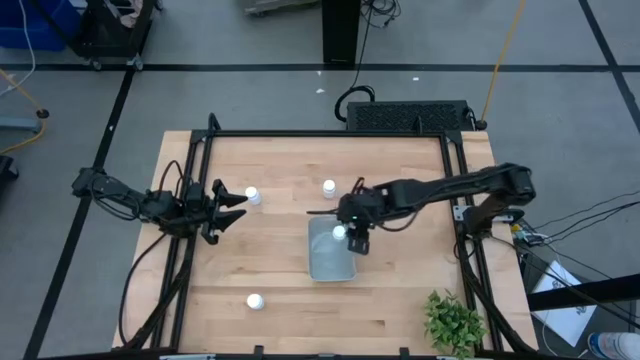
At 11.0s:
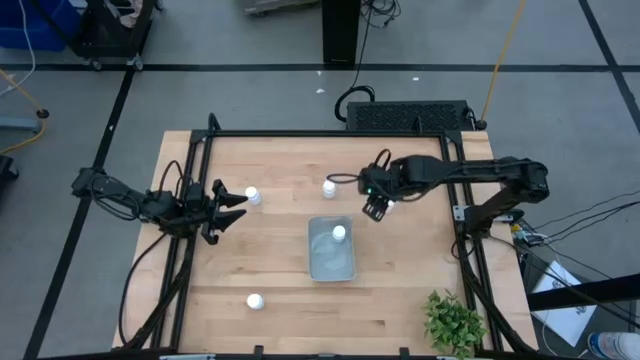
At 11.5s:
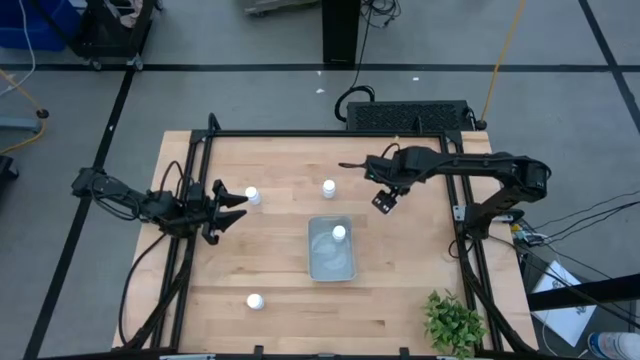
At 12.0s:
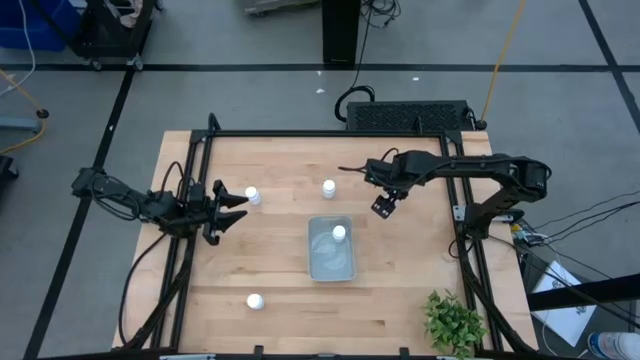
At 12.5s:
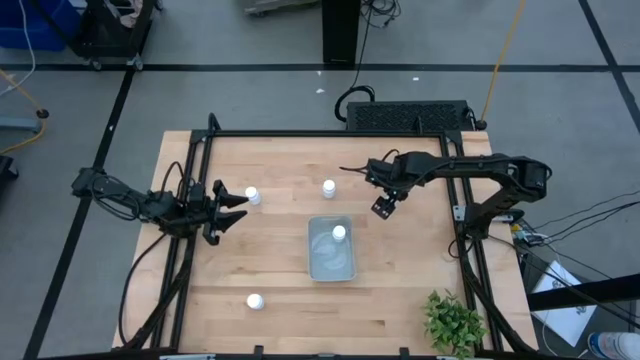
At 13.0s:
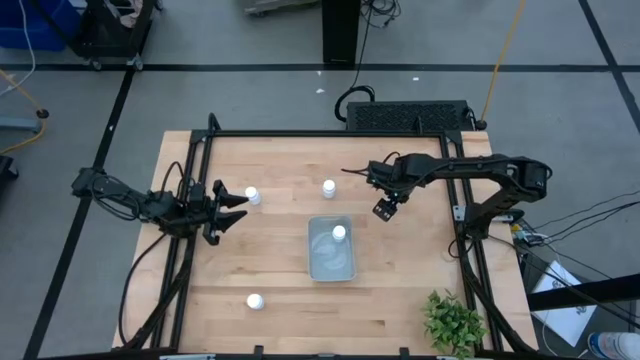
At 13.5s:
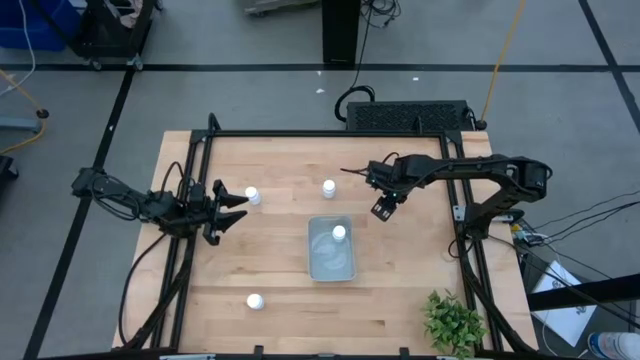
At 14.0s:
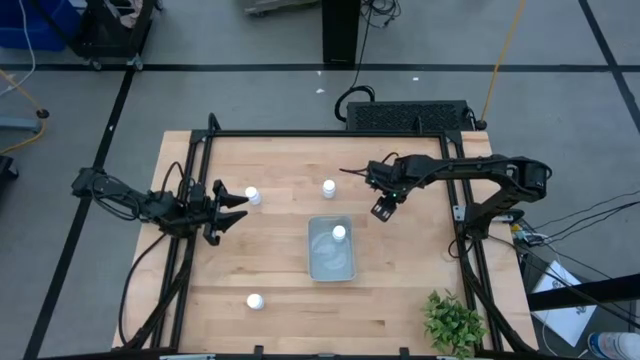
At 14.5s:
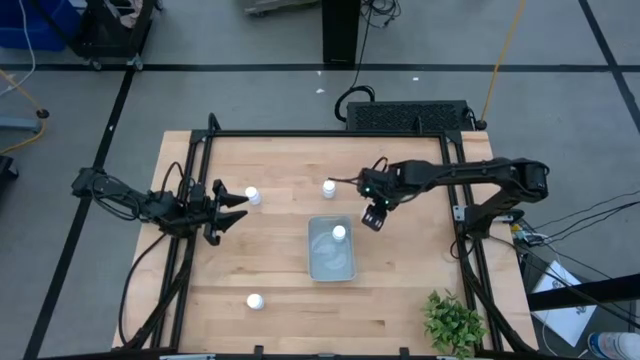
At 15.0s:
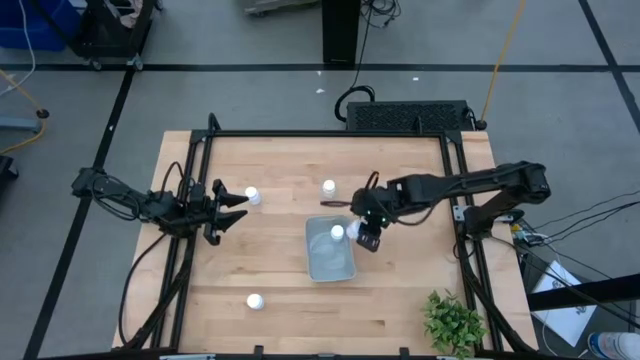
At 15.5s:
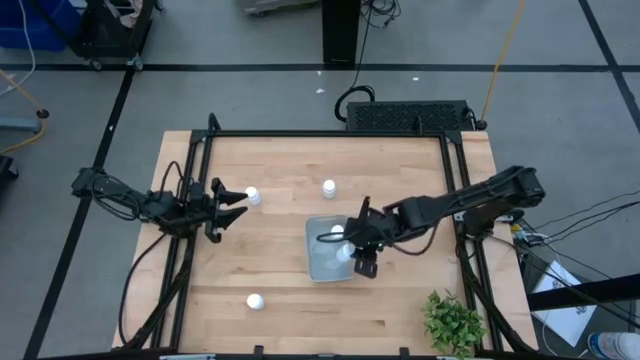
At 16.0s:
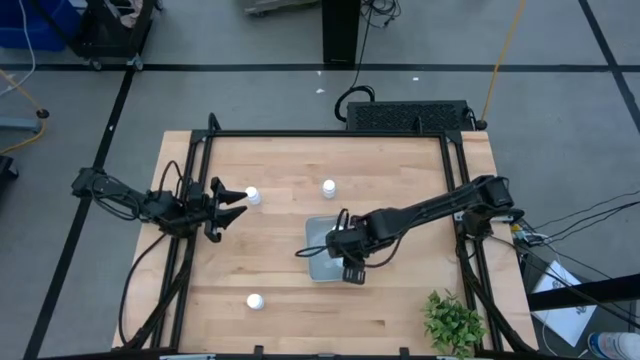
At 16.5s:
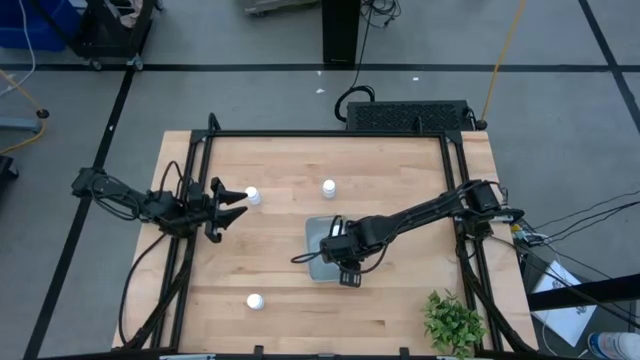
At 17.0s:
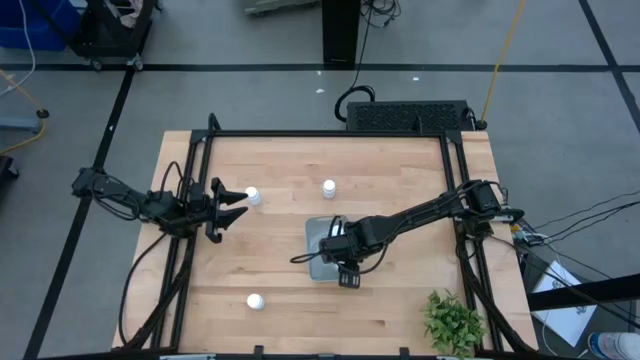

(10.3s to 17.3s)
Task: Pick and place pill bottles into a basket
Put the white medicine bottle into the gray bin

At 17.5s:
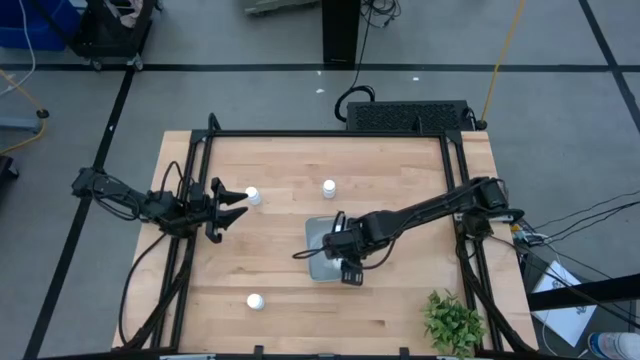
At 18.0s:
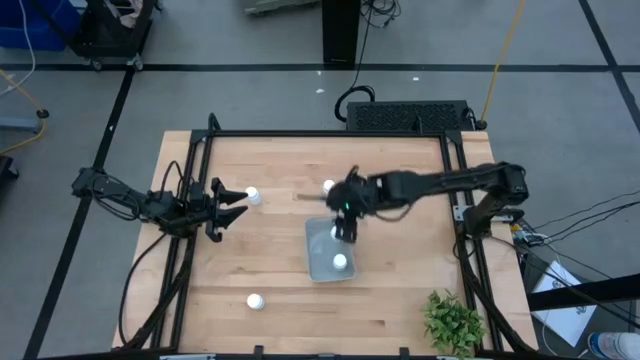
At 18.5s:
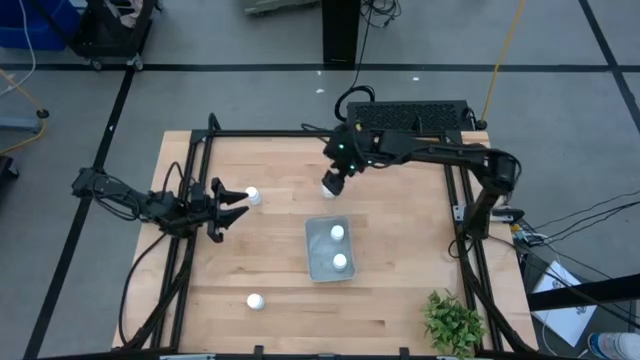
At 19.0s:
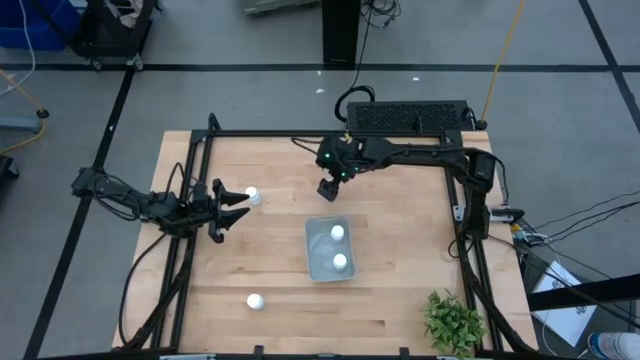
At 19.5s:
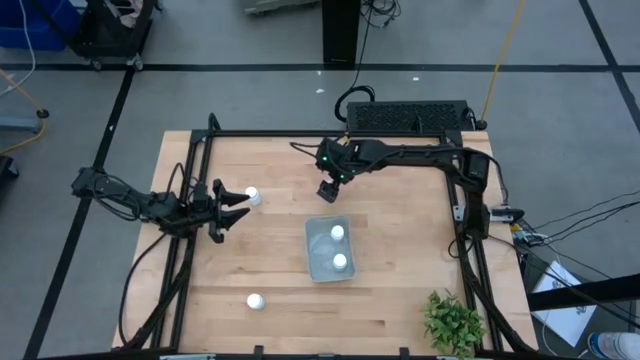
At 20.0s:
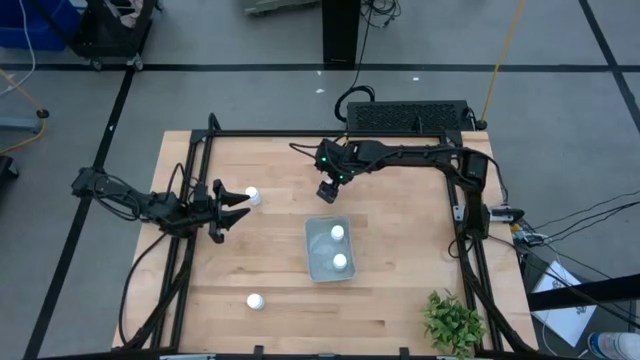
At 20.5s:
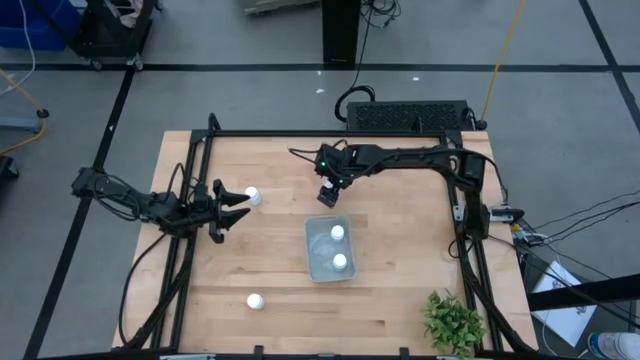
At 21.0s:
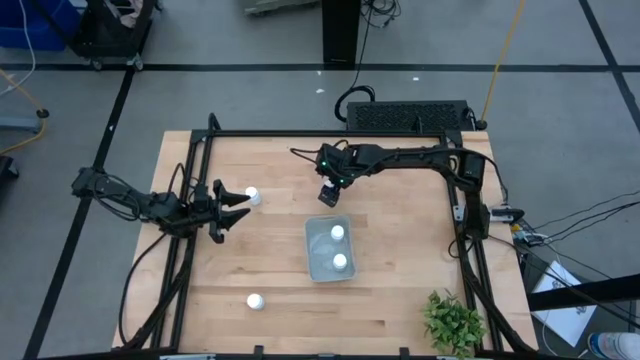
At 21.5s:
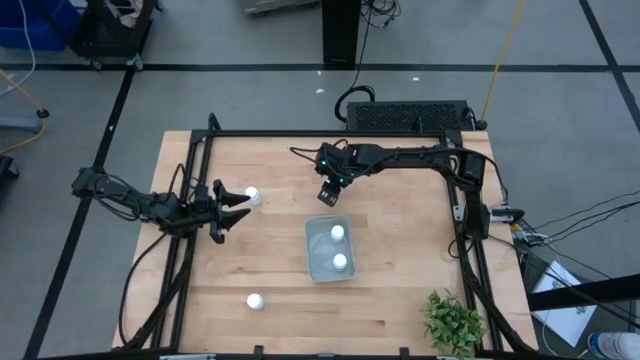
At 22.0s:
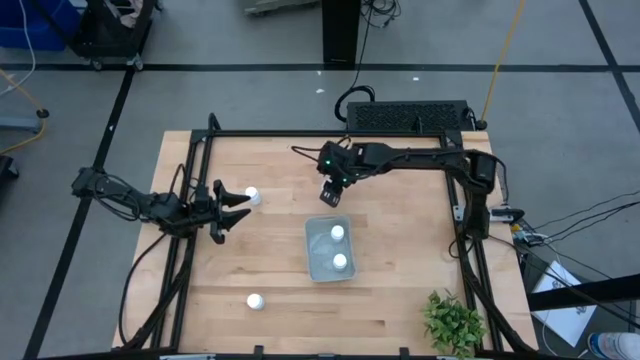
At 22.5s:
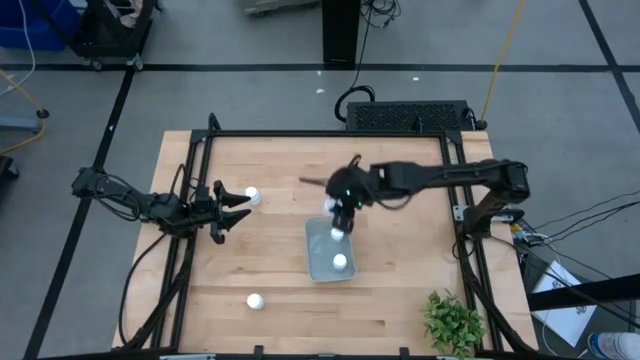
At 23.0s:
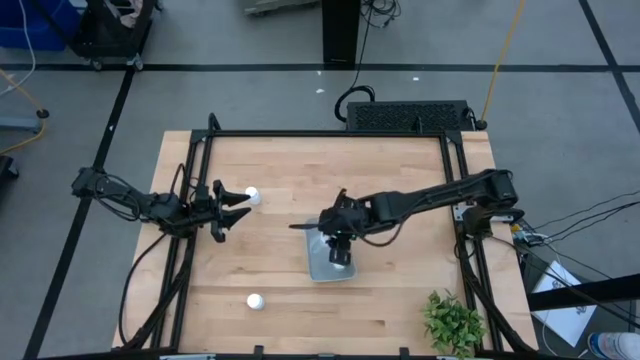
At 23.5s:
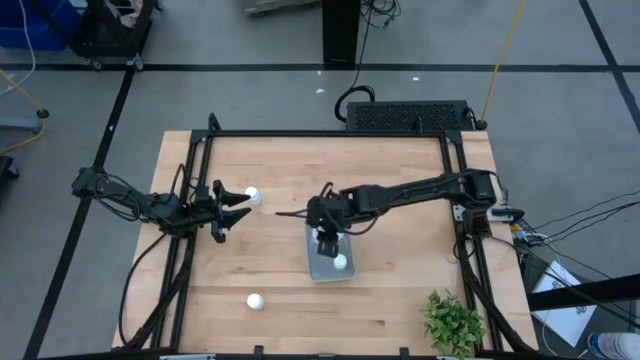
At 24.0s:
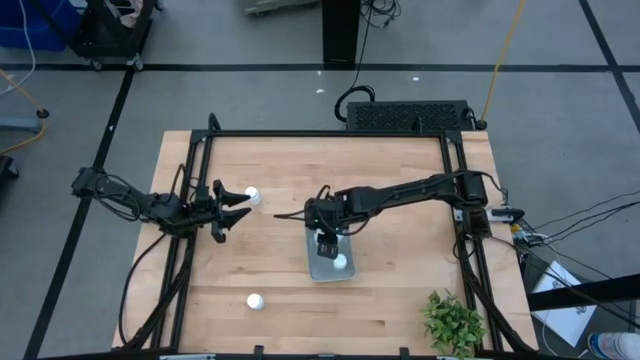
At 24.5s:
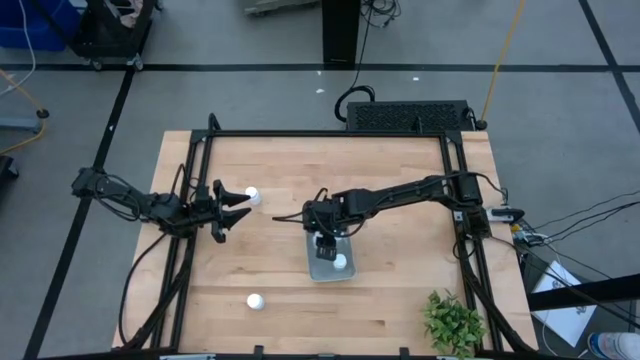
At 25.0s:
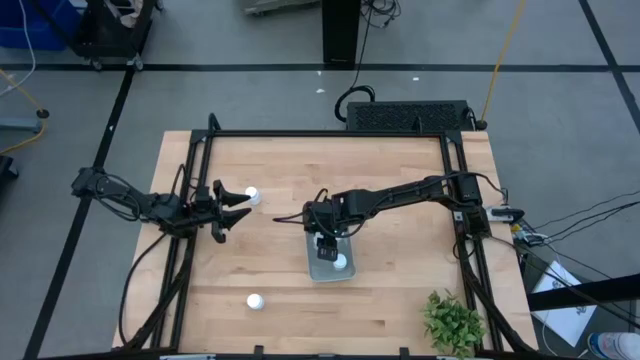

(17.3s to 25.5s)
Put the white medicine bottle into the gray bin

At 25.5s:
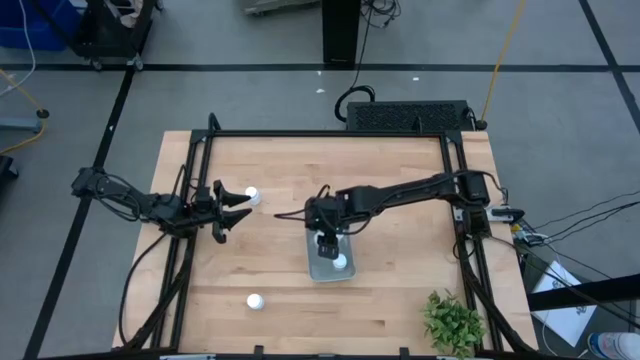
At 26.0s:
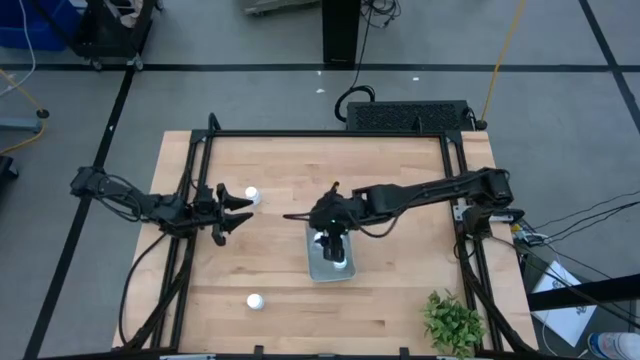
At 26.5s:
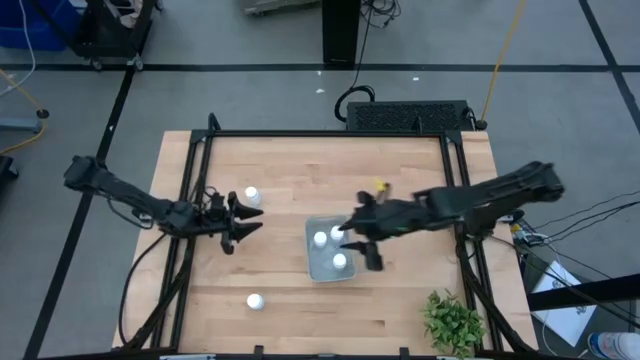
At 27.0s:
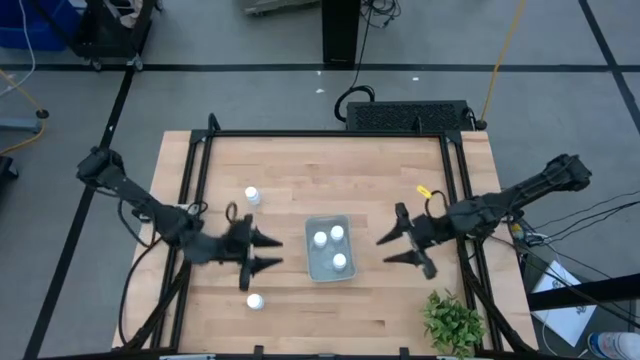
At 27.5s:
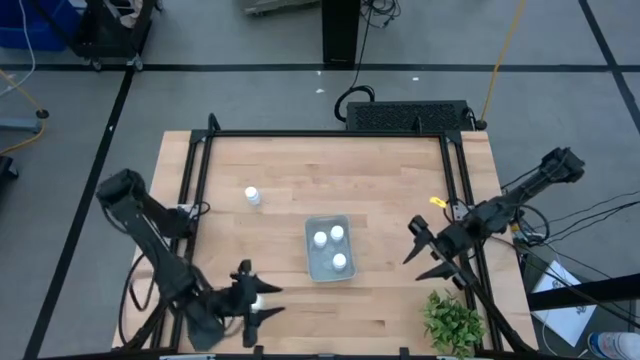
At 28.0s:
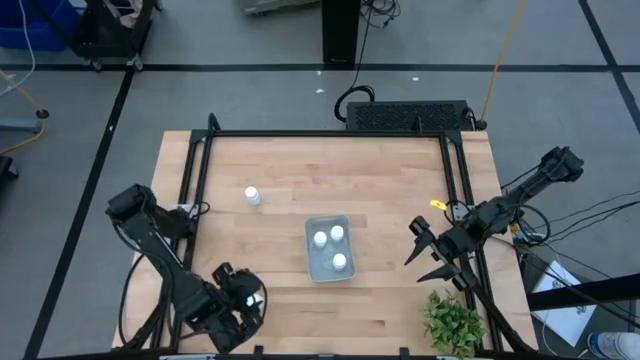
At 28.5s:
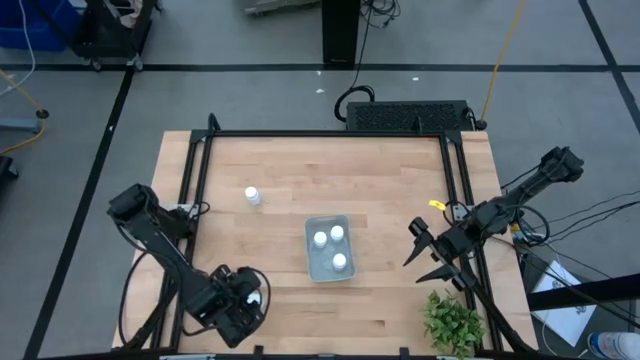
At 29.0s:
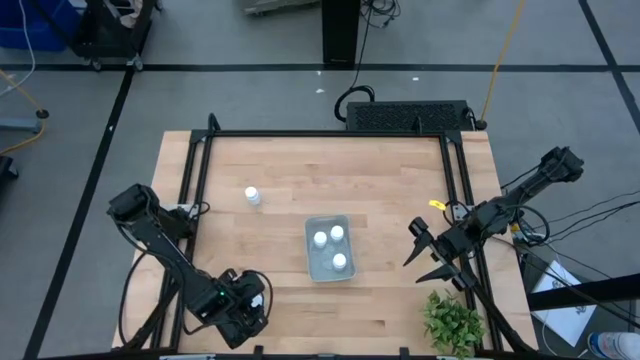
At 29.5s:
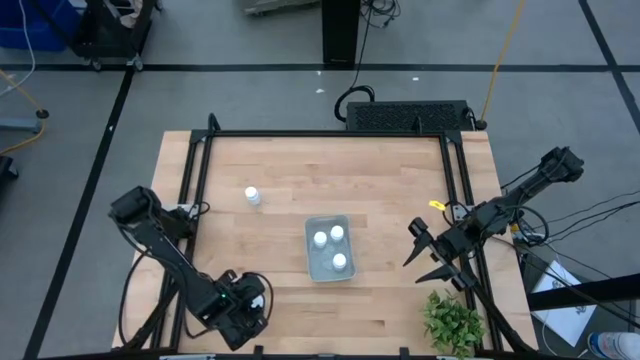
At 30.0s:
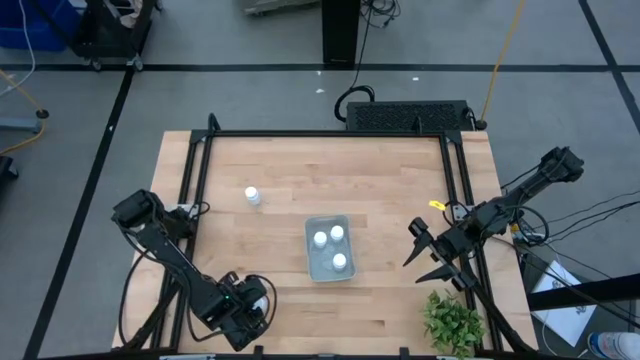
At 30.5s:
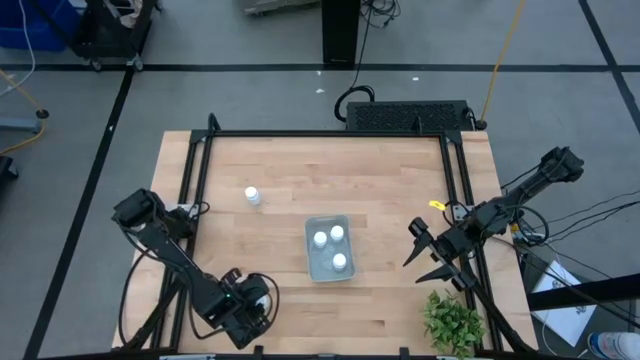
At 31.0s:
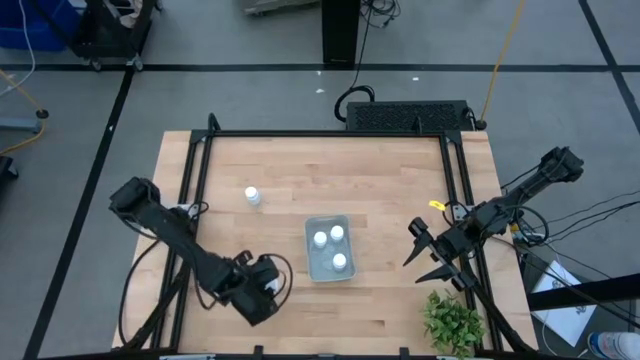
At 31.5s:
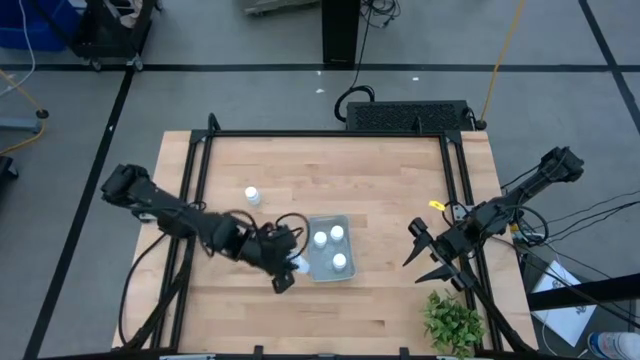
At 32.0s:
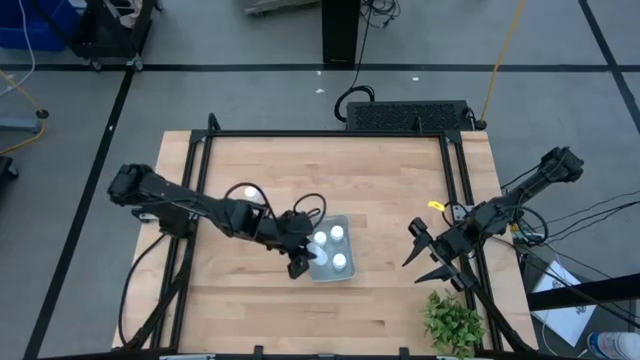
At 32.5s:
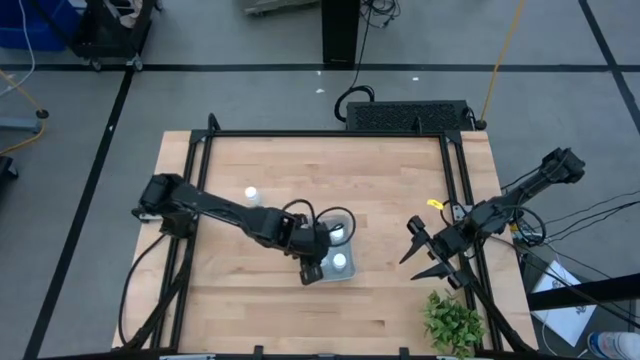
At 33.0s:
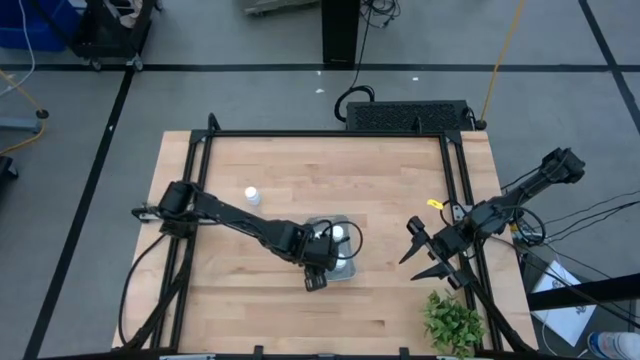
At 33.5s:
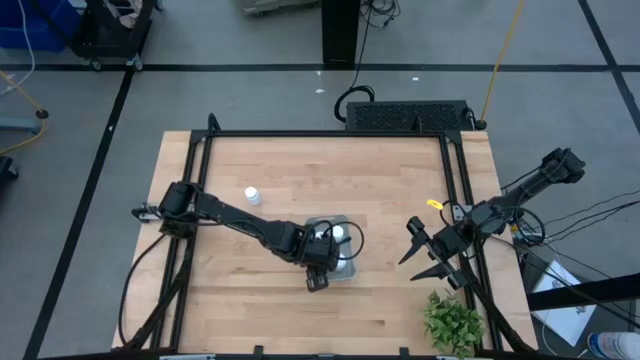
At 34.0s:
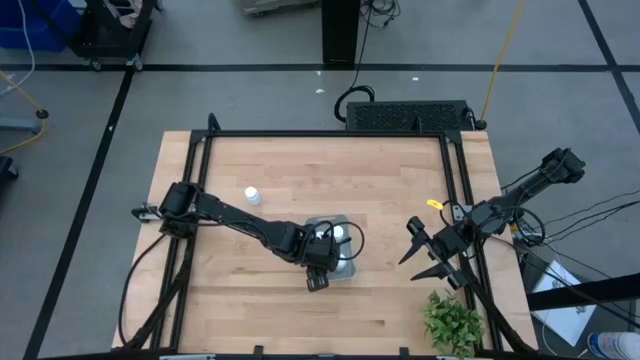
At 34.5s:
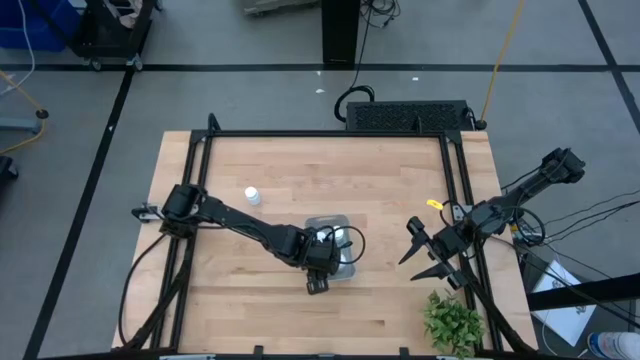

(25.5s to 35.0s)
Put the white medicine bottle into the gray bin
